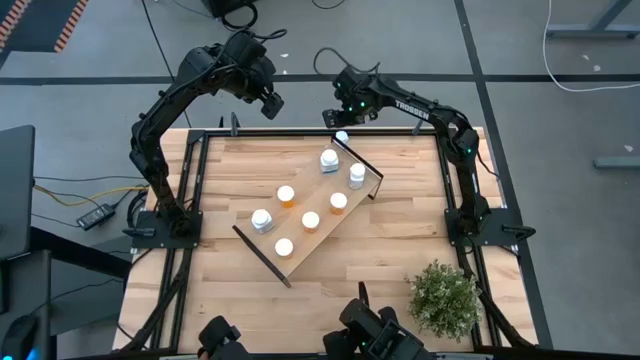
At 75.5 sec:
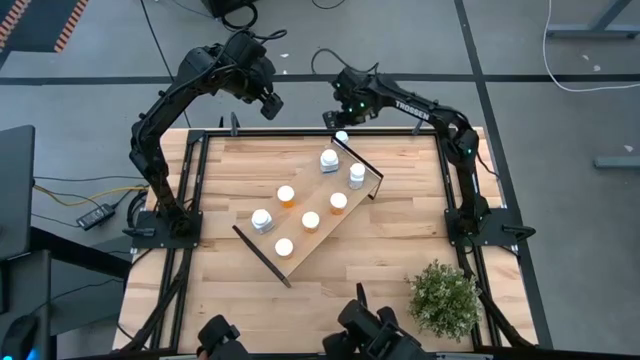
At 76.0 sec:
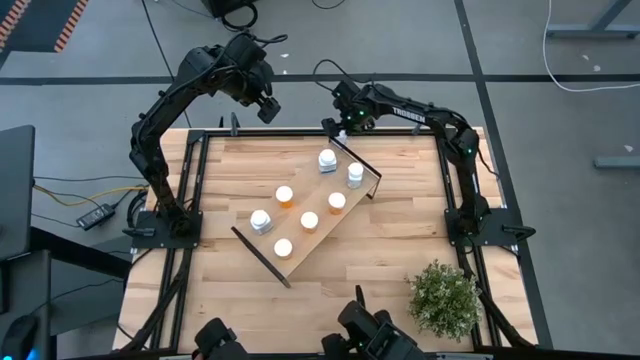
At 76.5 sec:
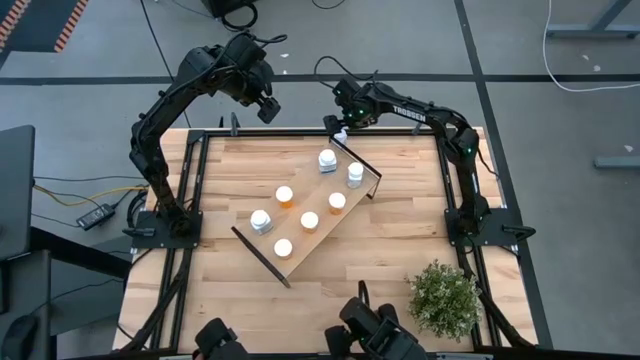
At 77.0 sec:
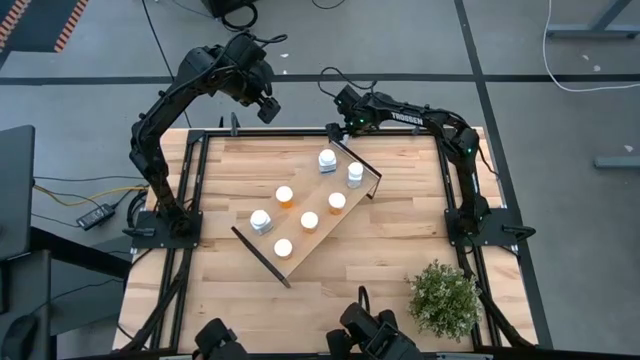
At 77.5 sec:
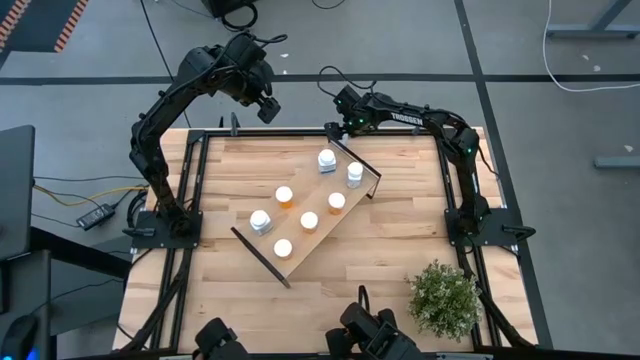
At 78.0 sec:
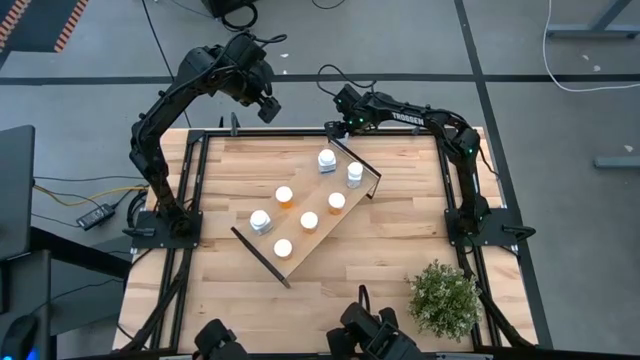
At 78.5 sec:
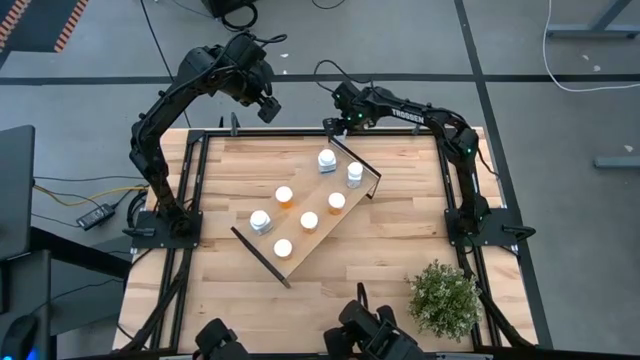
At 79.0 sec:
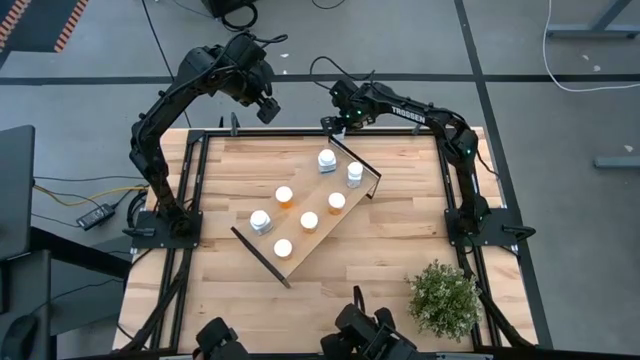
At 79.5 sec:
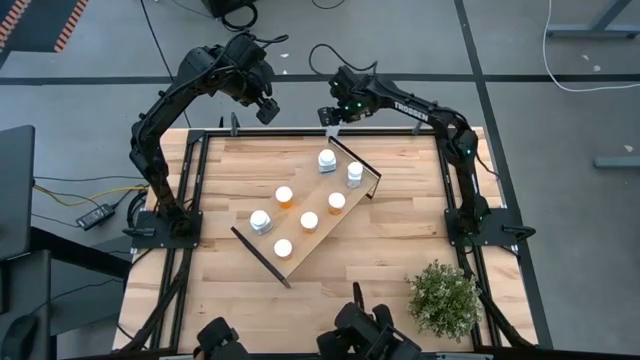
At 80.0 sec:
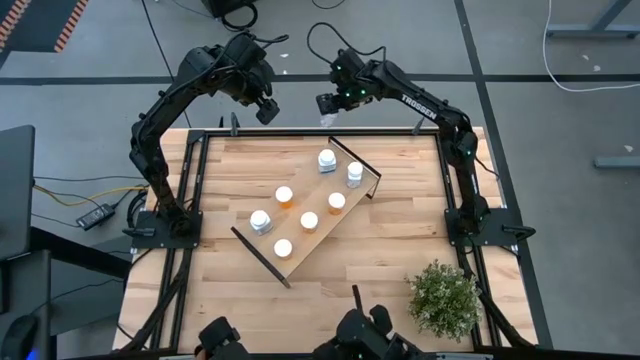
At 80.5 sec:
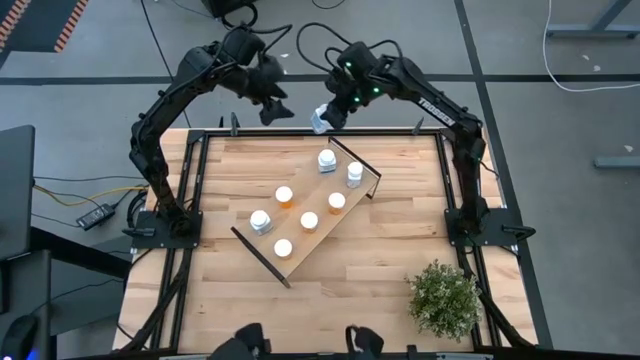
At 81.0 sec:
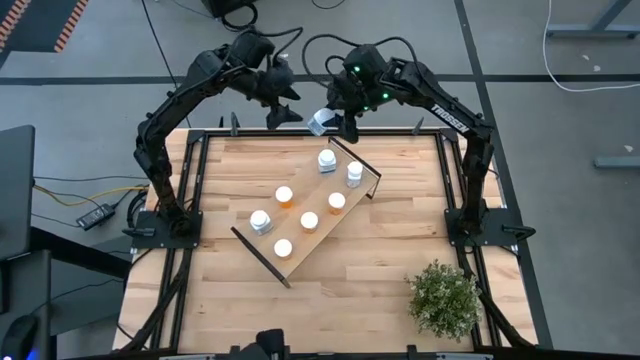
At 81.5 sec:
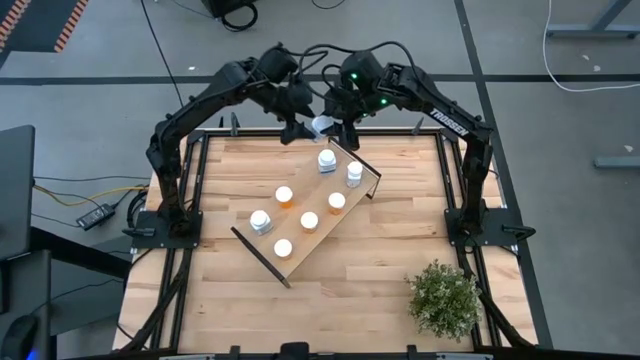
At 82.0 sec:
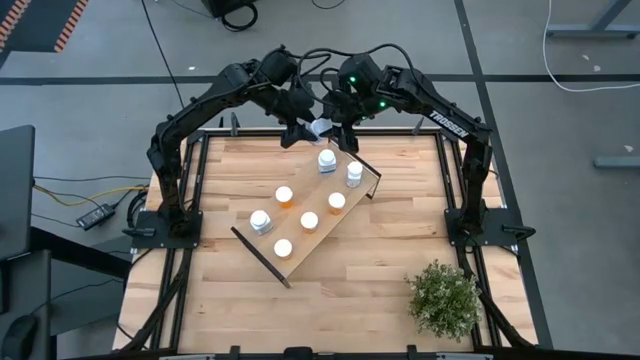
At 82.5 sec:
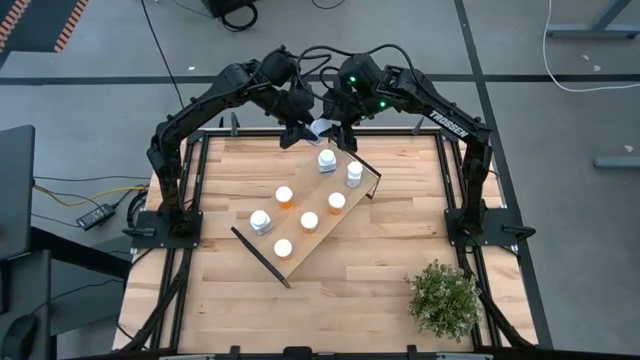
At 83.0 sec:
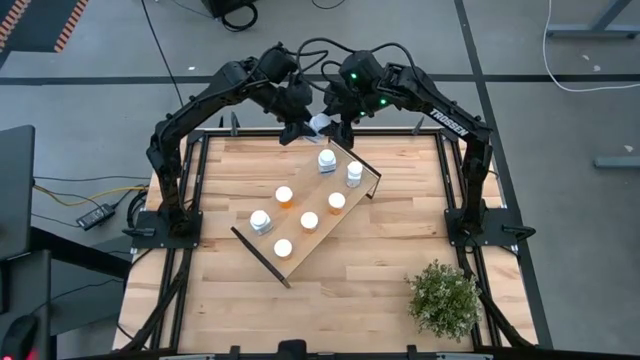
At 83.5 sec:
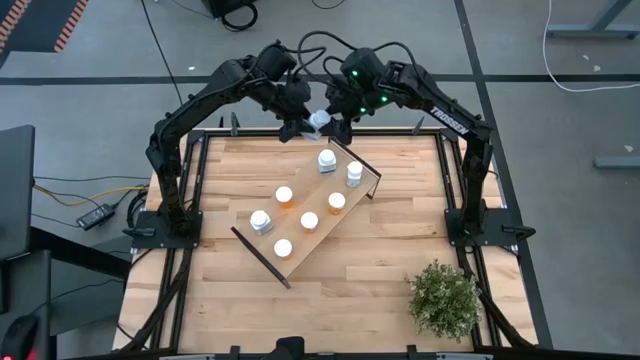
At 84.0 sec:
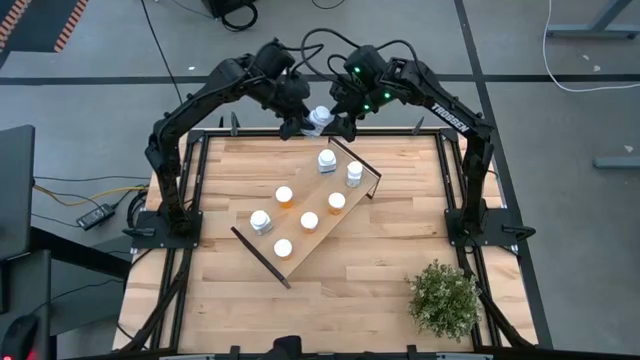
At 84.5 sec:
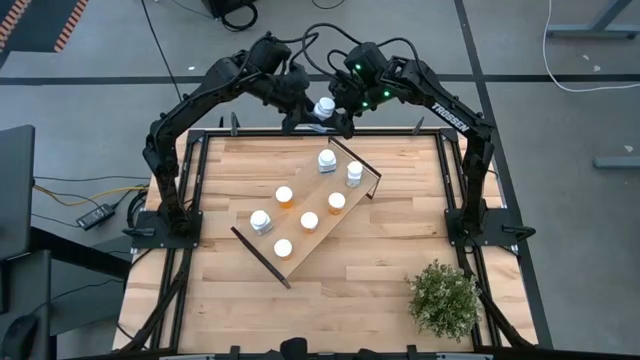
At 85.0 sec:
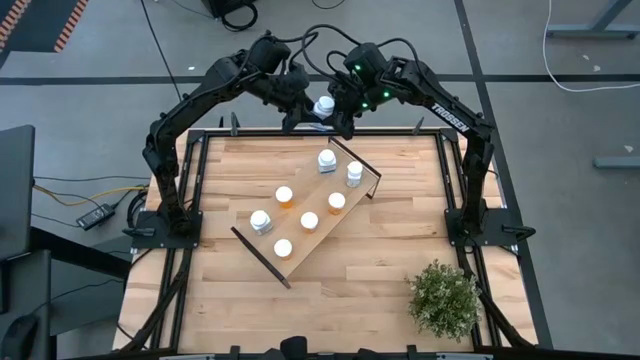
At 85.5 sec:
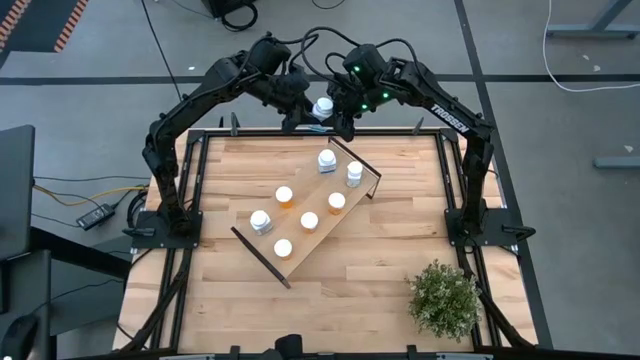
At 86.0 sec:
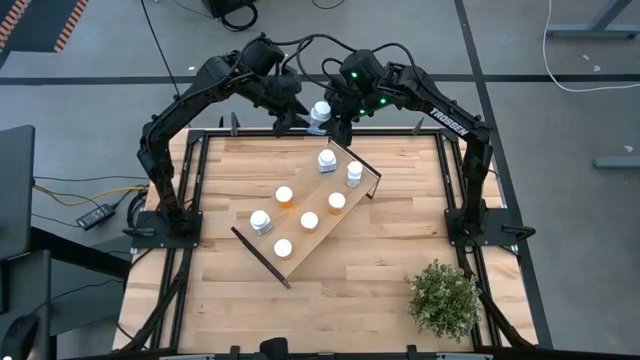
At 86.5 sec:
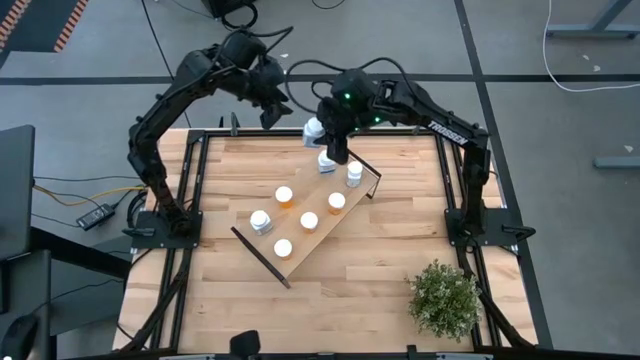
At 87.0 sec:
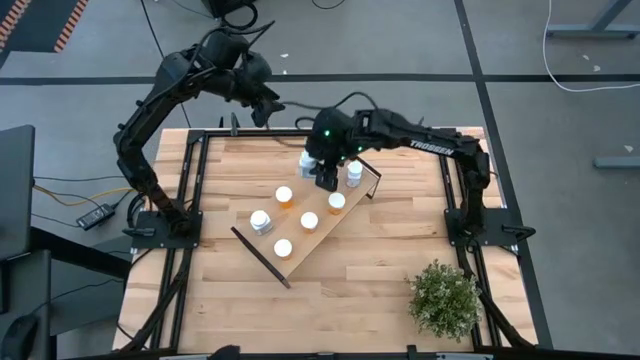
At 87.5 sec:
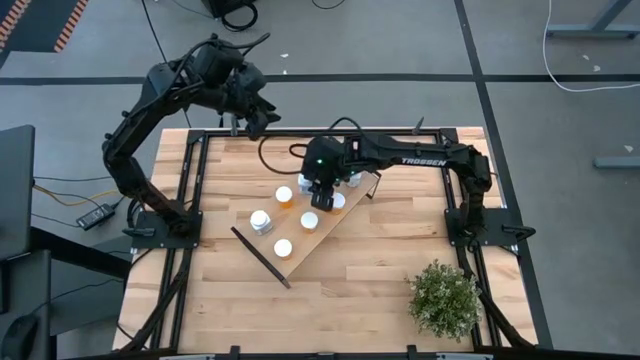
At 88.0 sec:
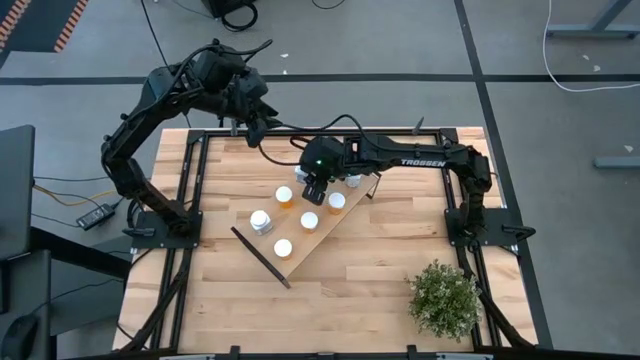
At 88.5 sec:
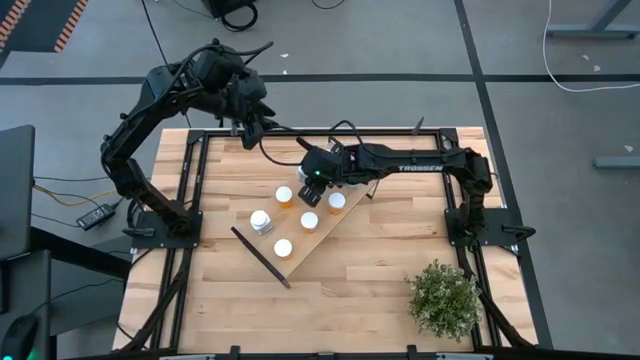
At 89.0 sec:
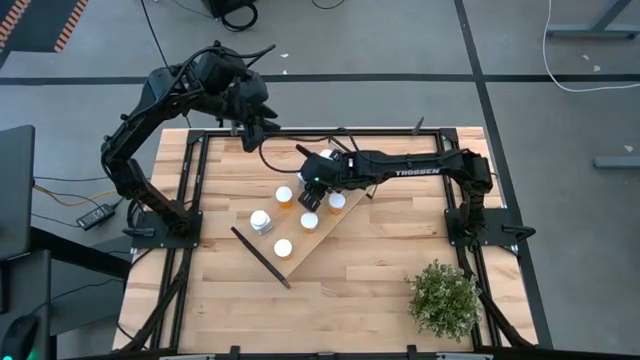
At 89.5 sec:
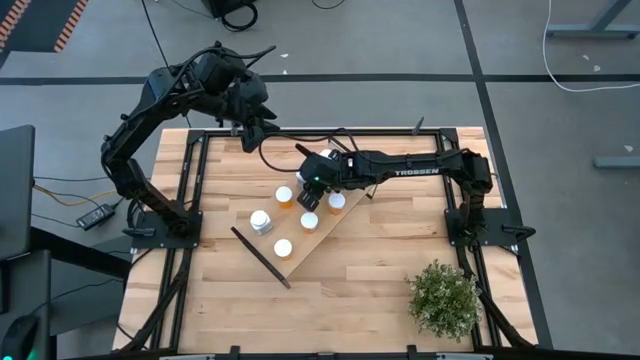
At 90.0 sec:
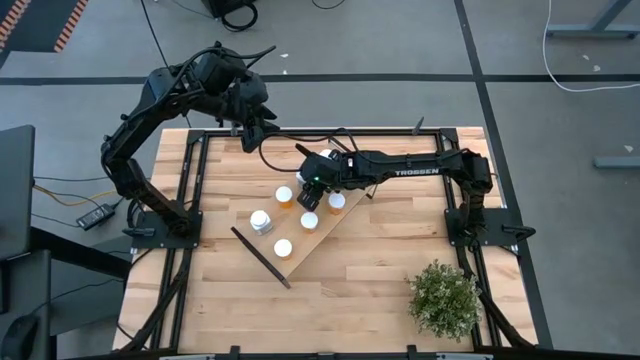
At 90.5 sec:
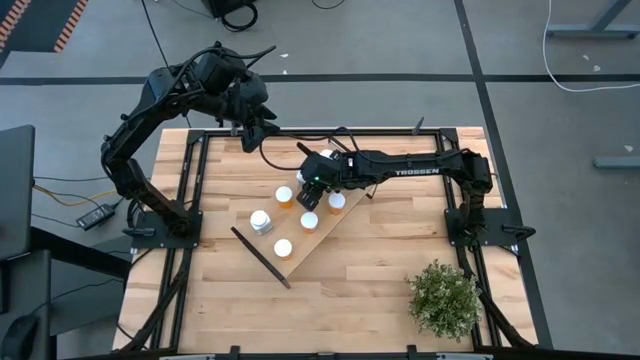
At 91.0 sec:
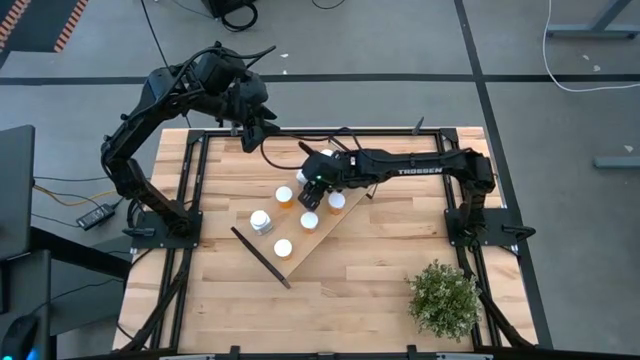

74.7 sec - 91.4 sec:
Task: Pick and place medicine bottles onto shelf by color
Put the white pill bottle on the shelf

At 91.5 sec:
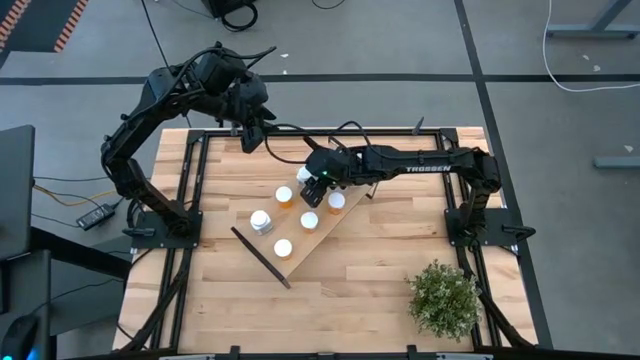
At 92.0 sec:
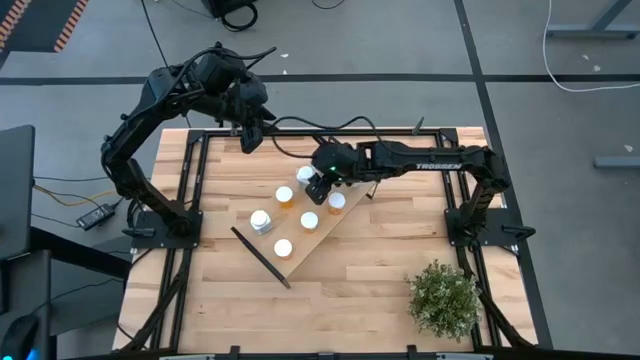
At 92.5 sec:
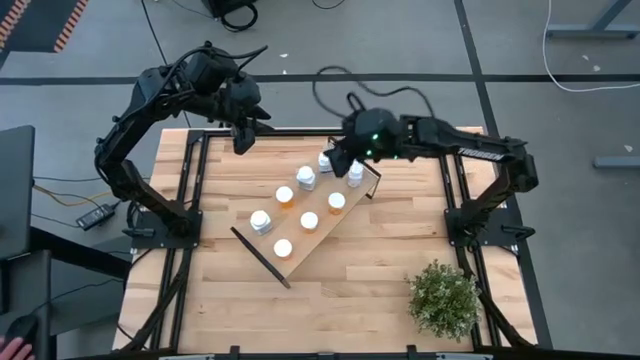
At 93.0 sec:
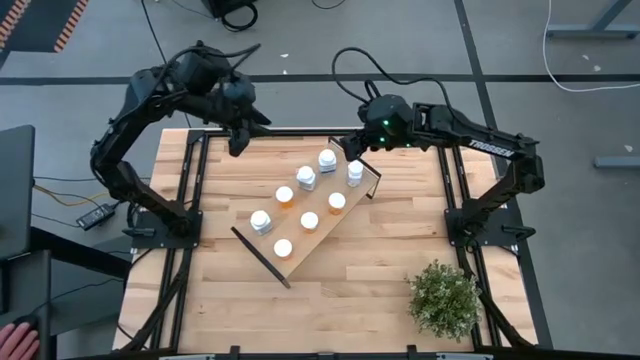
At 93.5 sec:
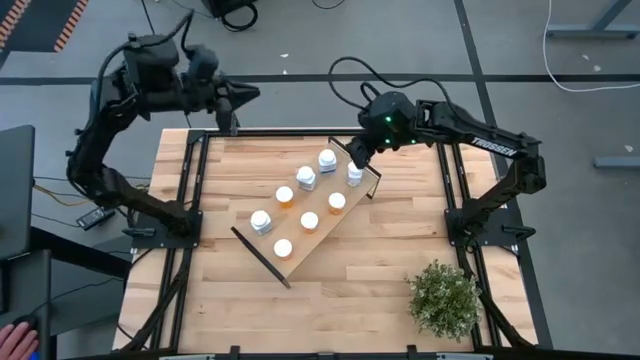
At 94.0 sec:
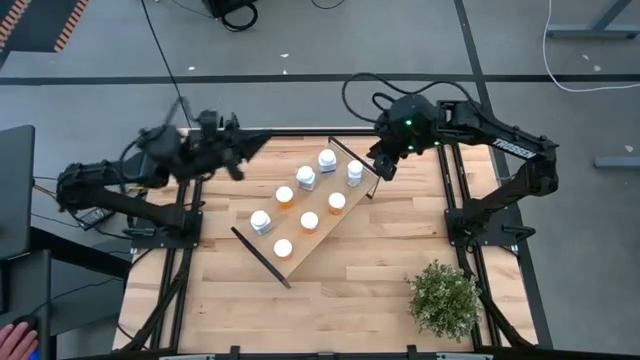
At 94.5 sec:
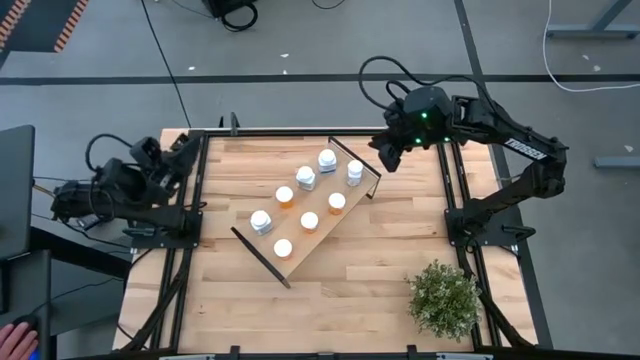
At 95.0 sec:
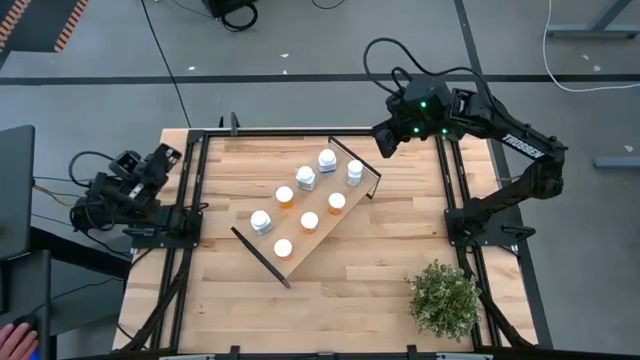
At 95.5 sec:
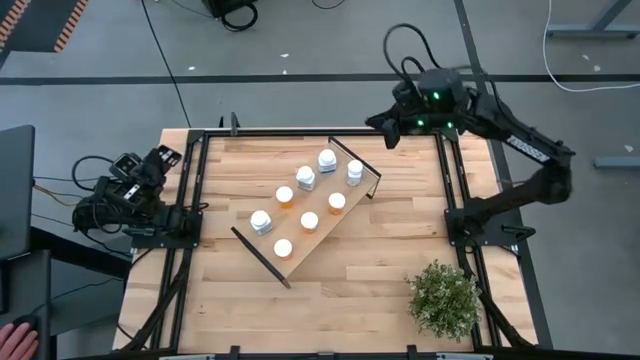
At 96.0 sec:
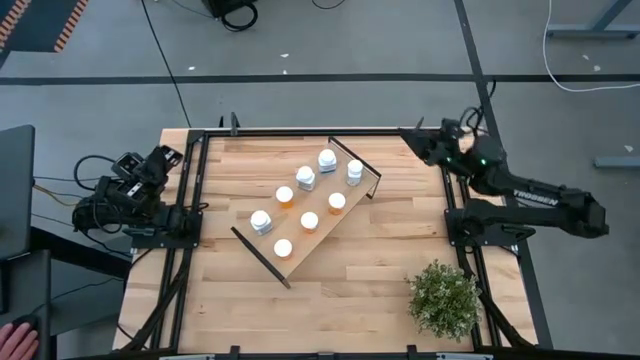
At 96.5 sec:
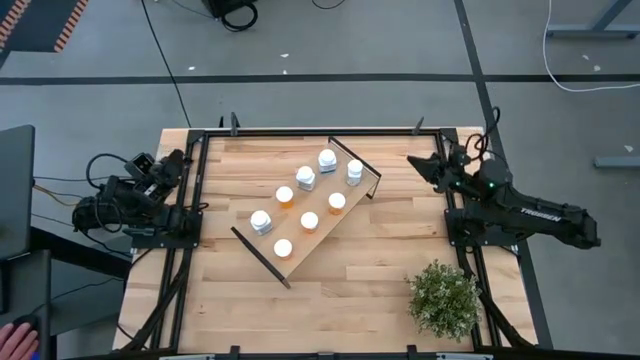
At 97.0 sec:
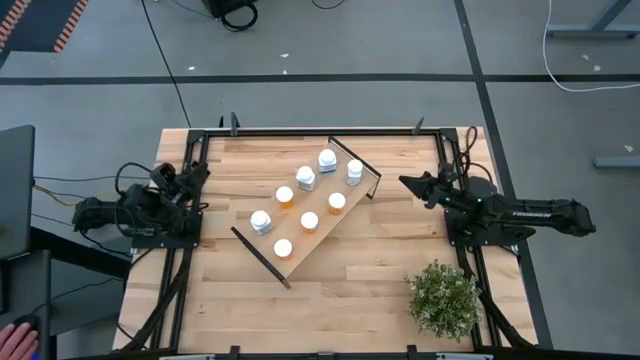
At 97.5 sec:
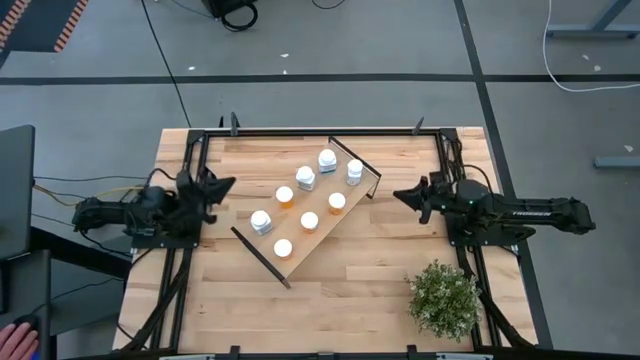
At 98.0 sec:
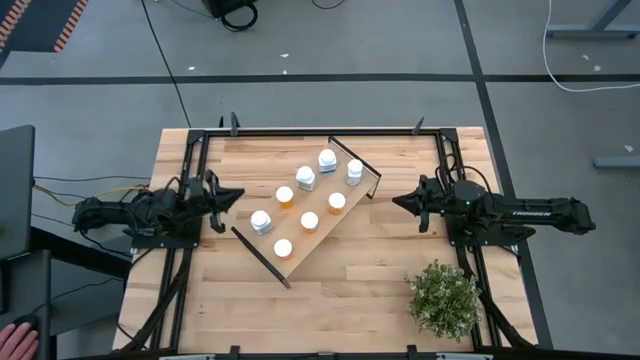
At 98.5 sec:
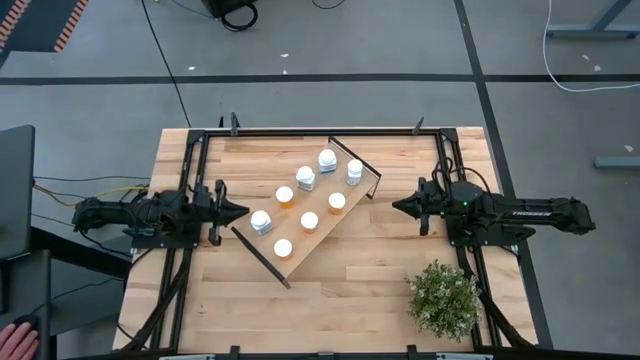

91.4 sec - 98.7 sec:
Return to Home Position
